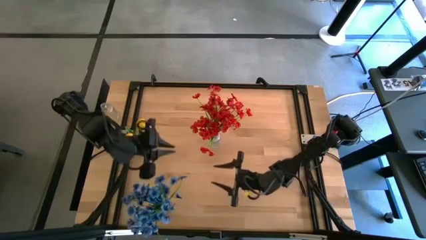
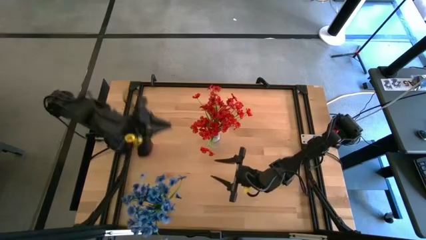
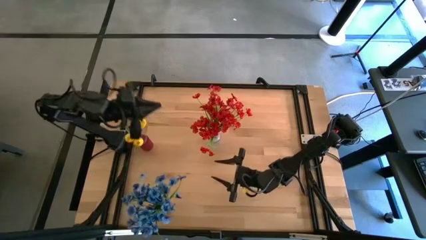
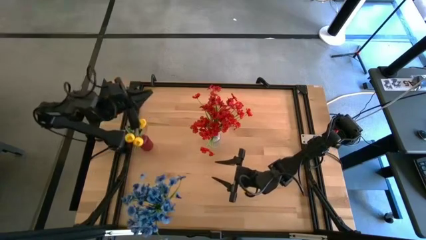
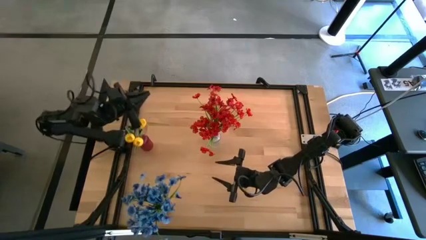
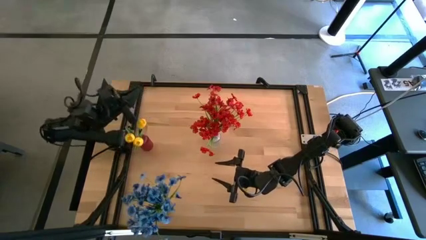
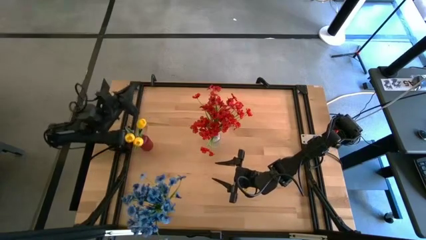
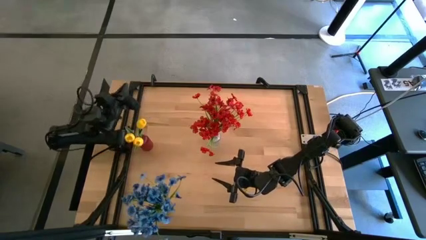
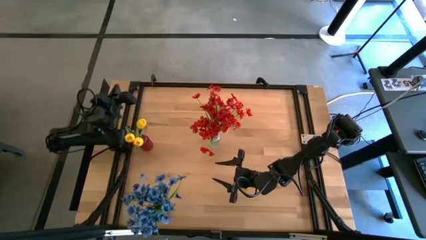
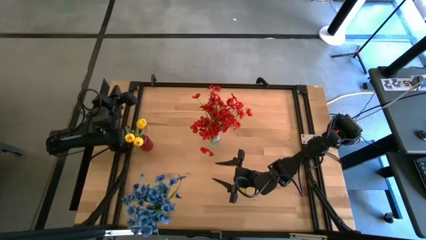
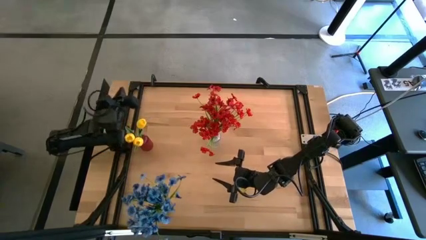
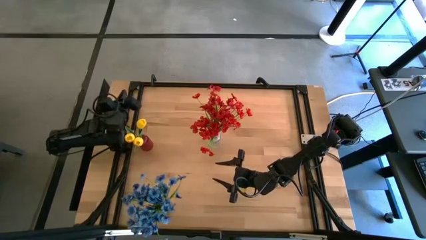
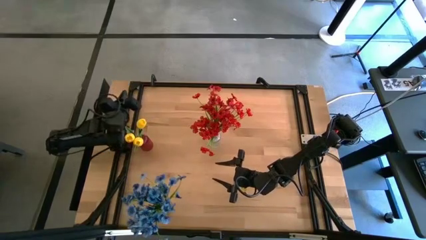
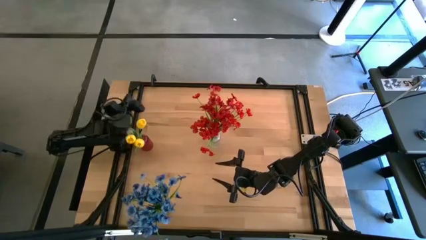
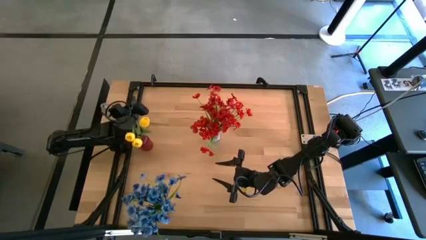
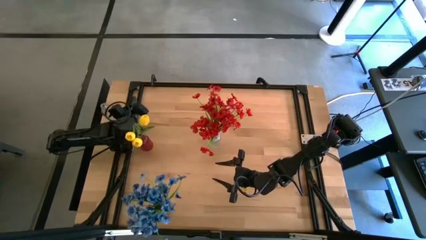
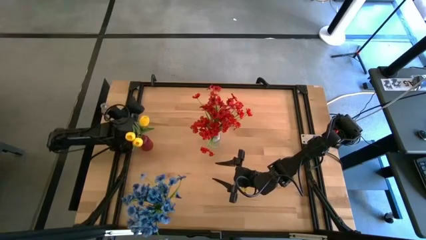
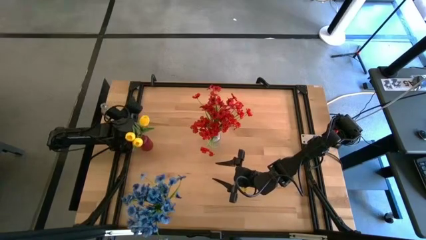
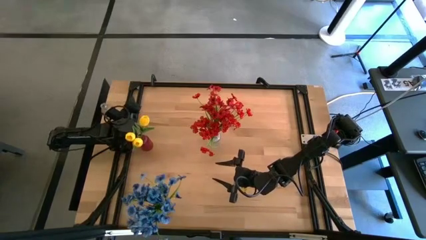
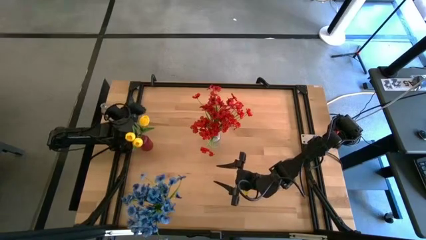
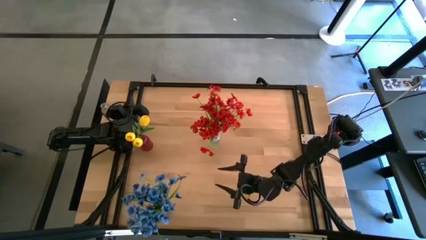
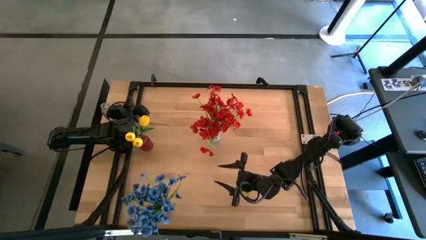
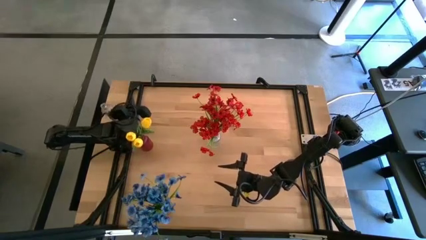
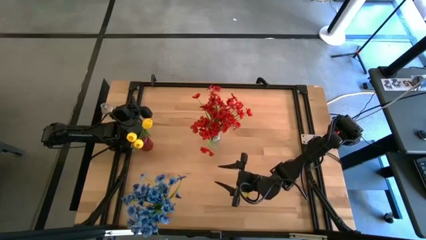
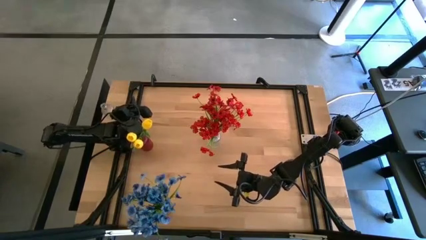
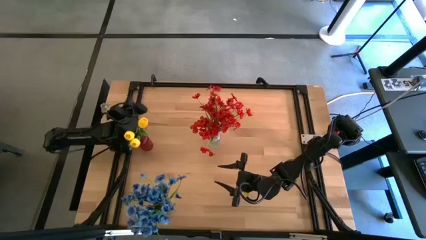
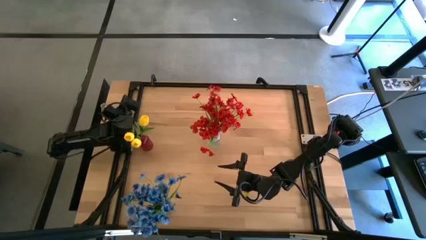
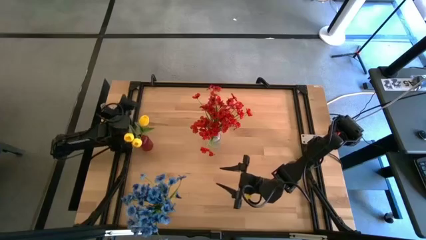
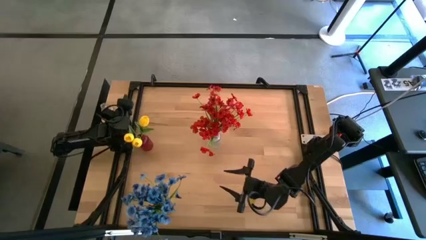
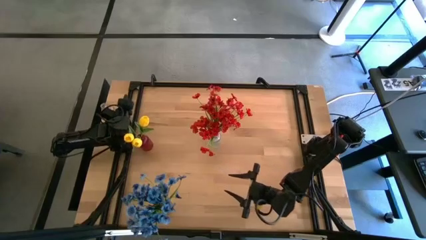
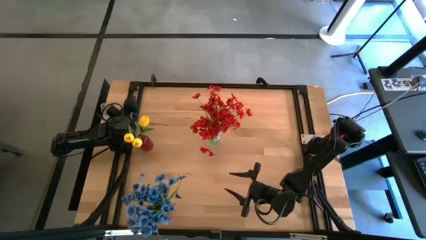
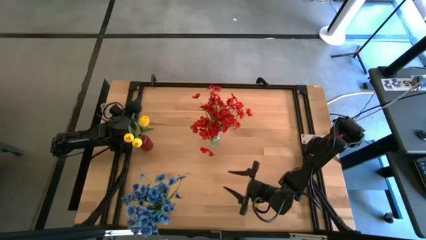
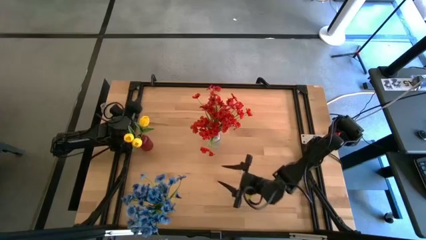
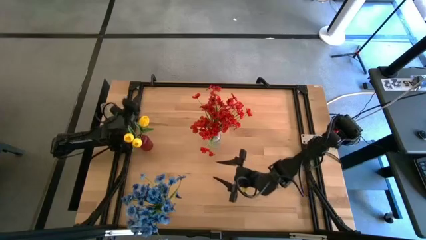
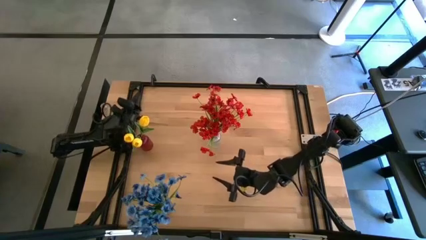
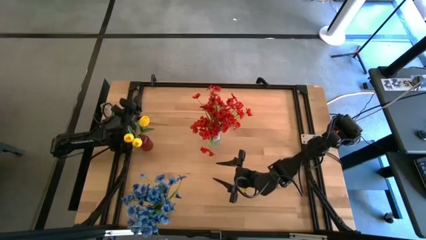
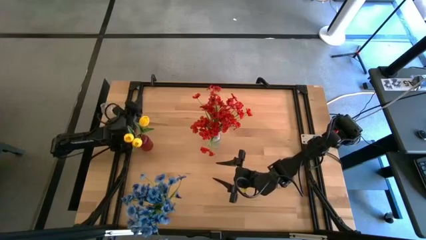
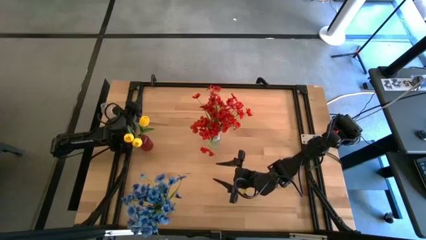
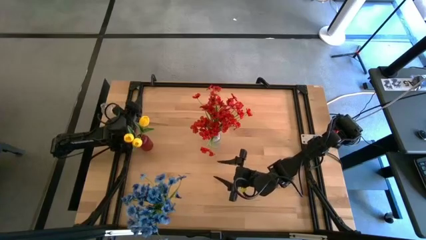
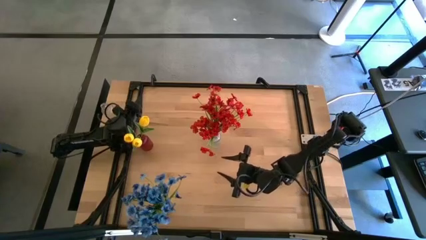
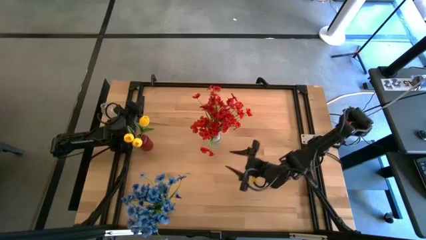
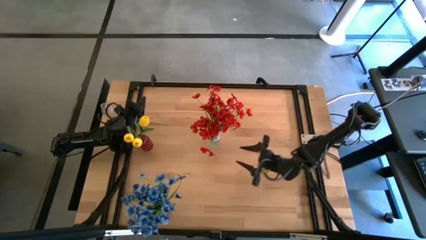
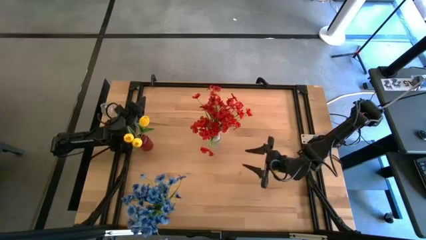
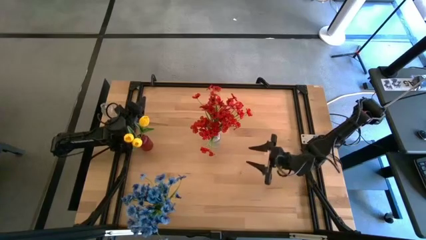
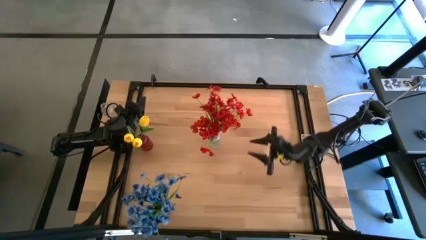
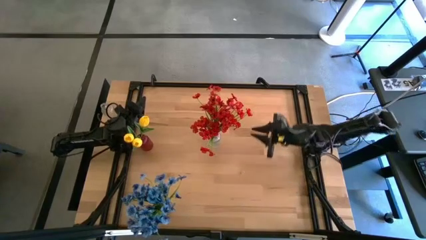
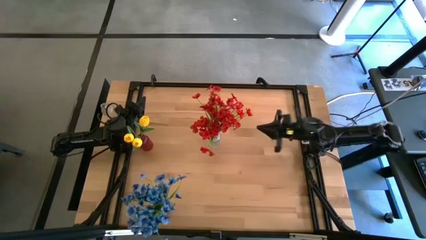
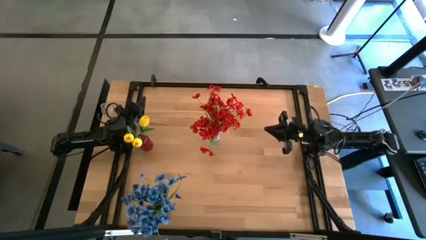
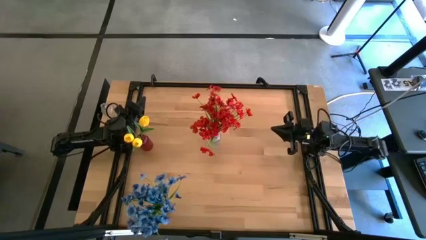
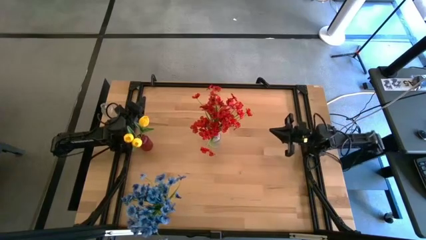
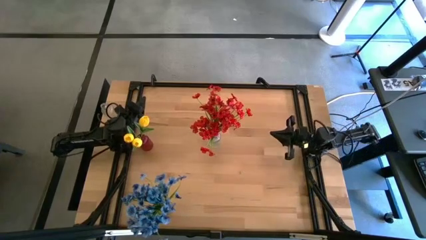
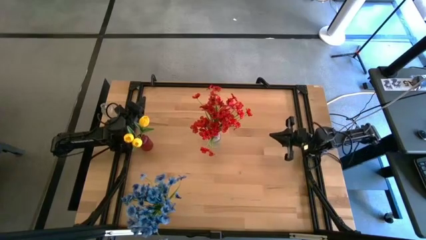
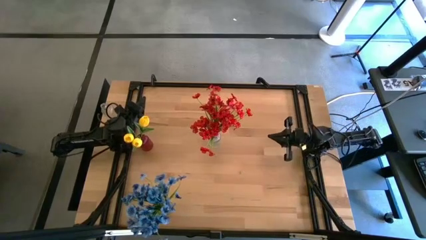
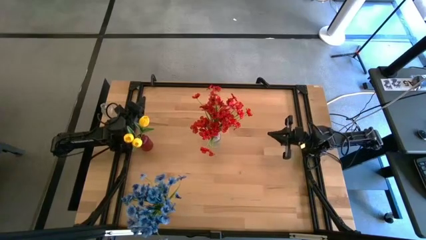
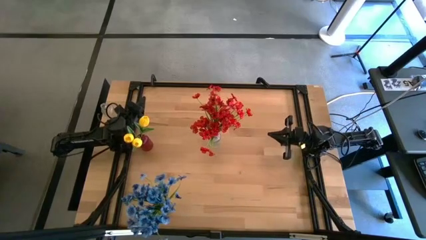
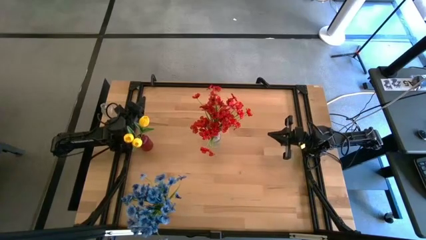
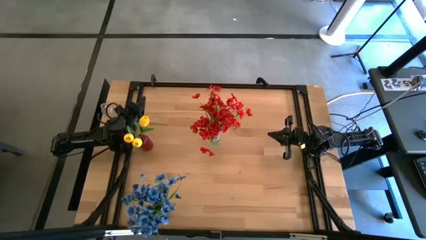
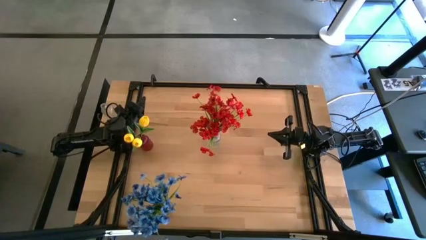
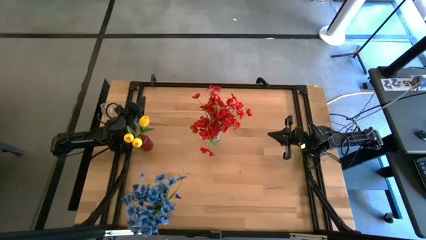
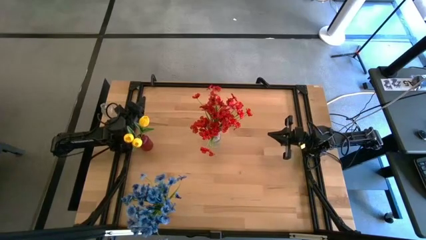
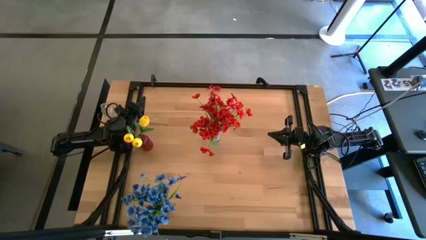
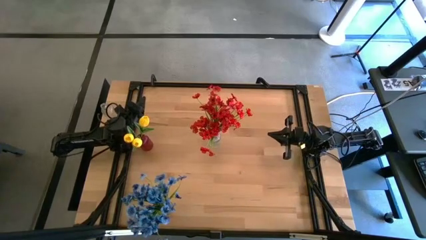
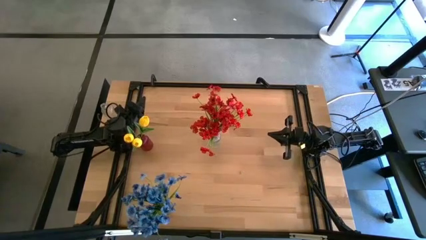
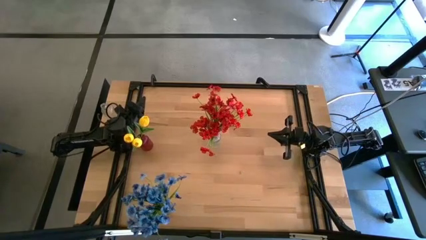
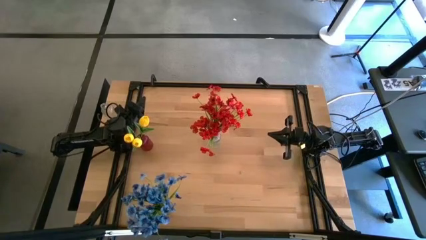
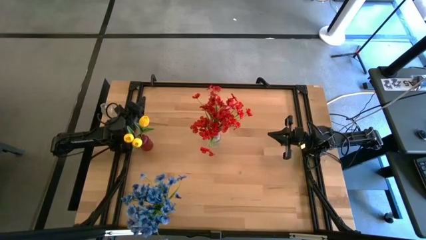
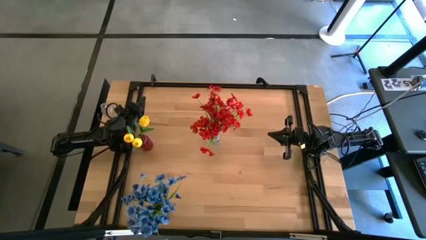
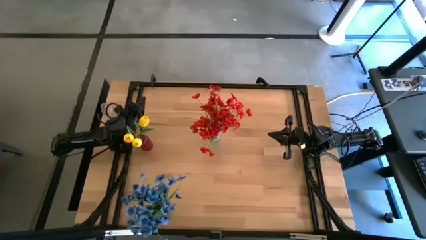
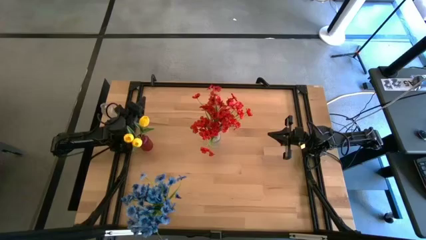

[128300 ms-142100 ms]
Task: Sort flowers into vase by color
Return to Home Position
